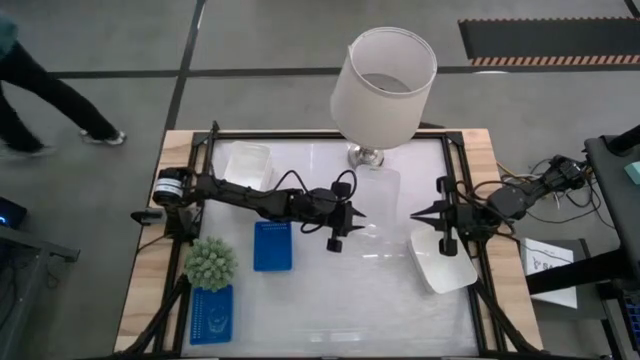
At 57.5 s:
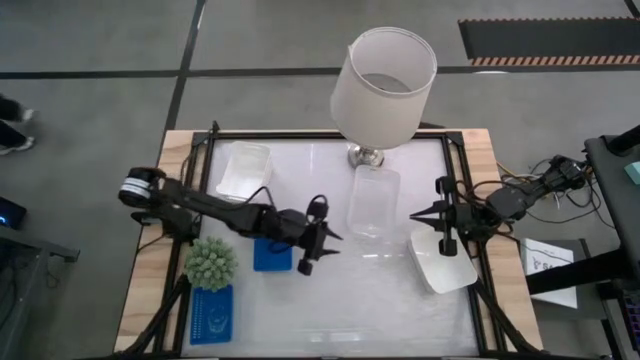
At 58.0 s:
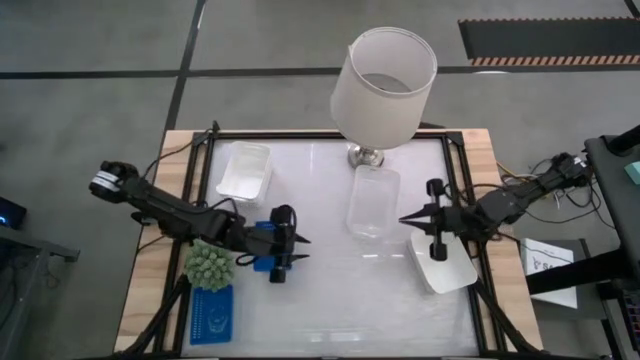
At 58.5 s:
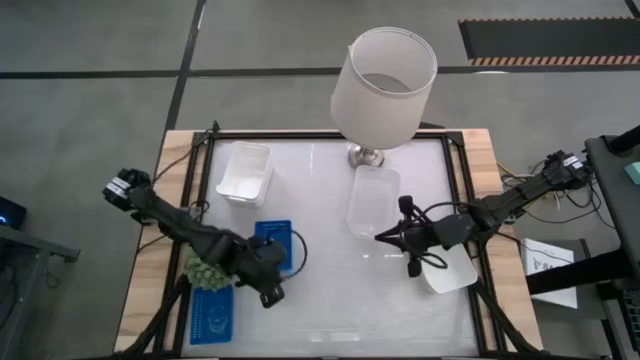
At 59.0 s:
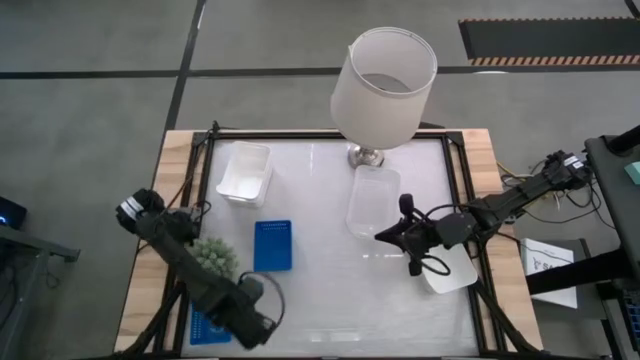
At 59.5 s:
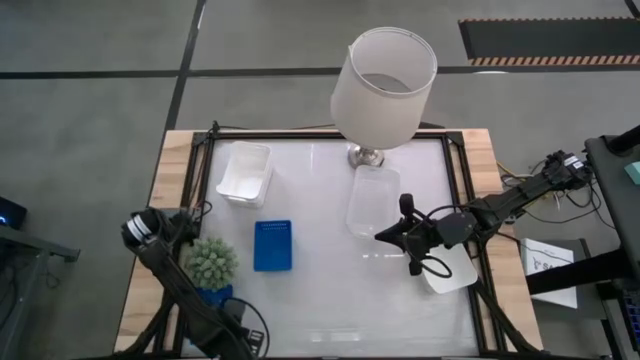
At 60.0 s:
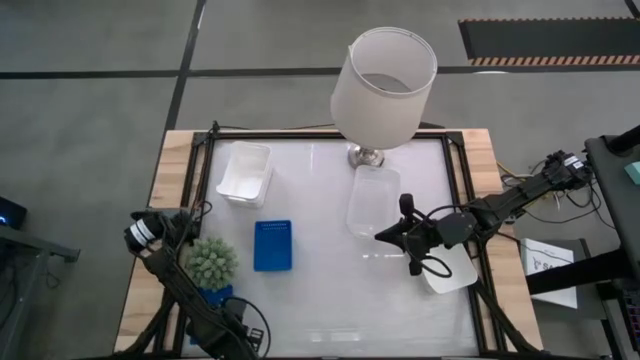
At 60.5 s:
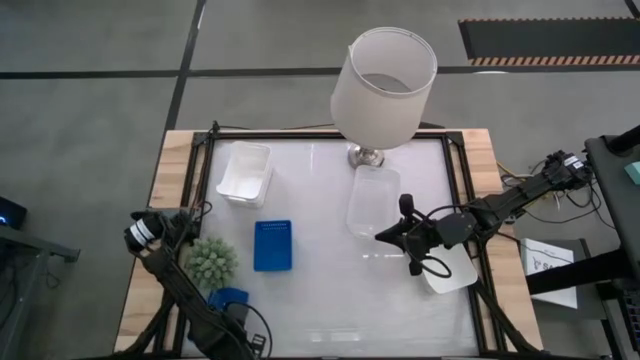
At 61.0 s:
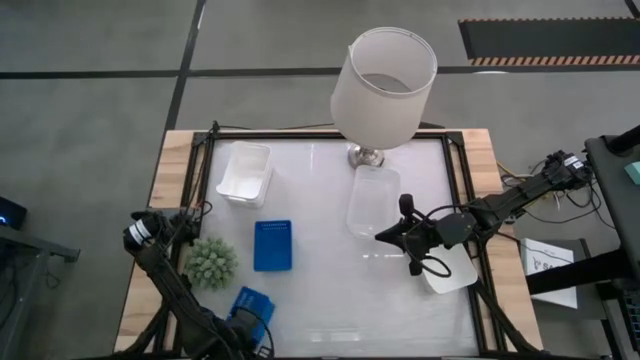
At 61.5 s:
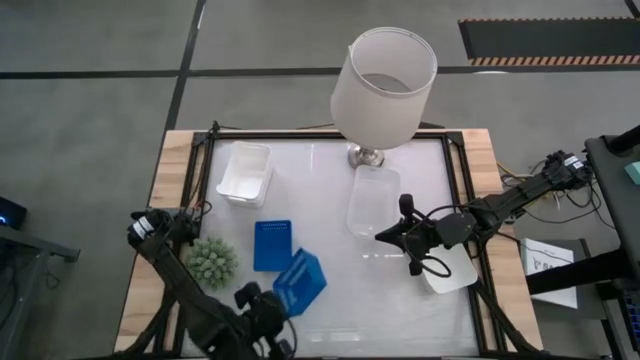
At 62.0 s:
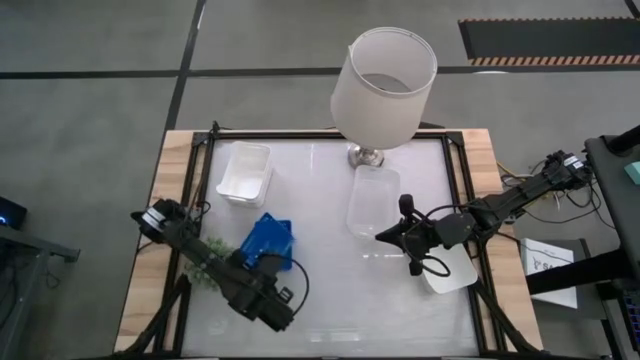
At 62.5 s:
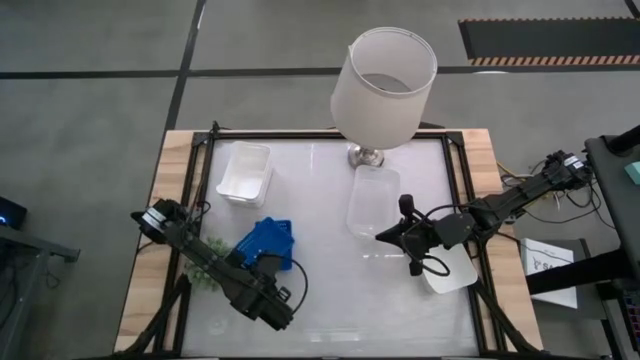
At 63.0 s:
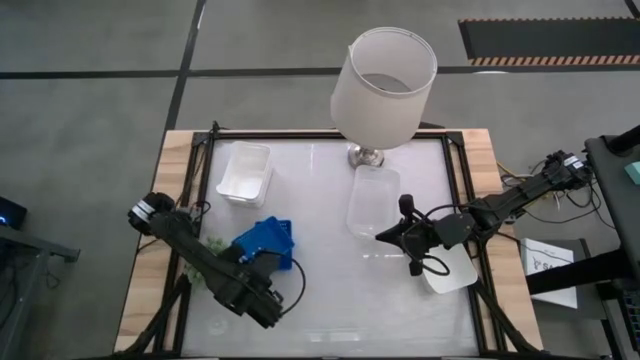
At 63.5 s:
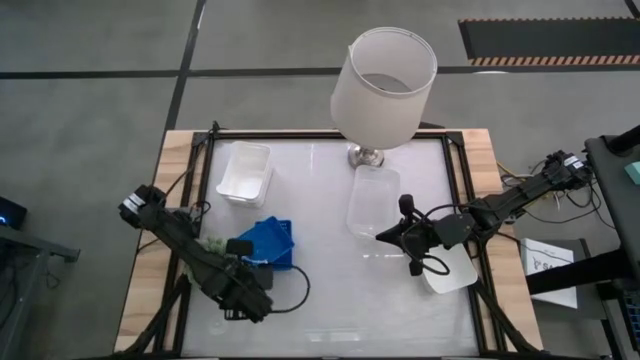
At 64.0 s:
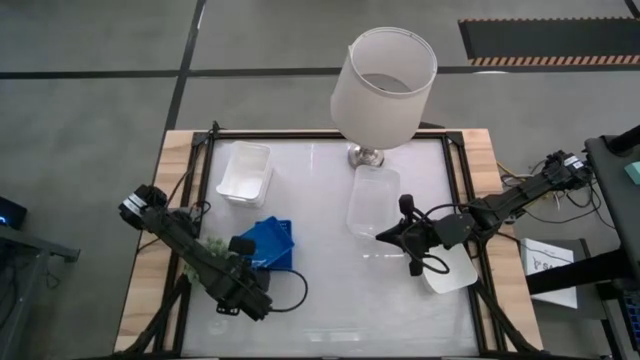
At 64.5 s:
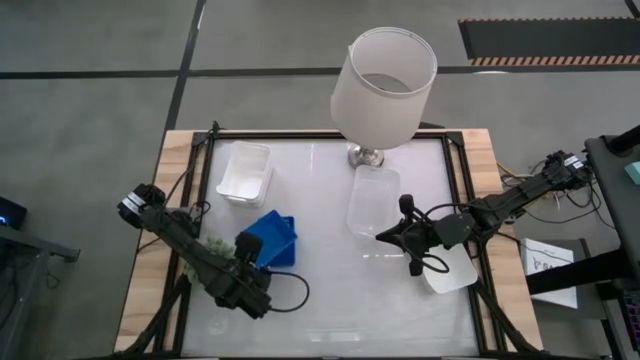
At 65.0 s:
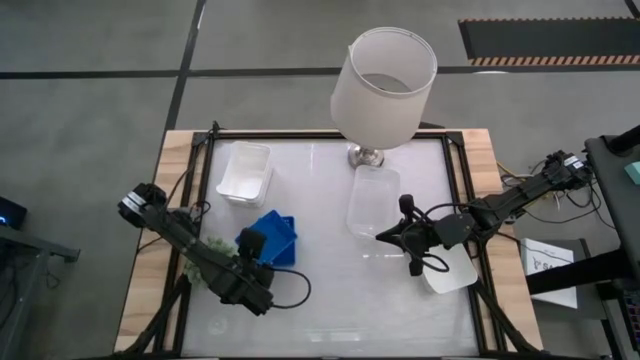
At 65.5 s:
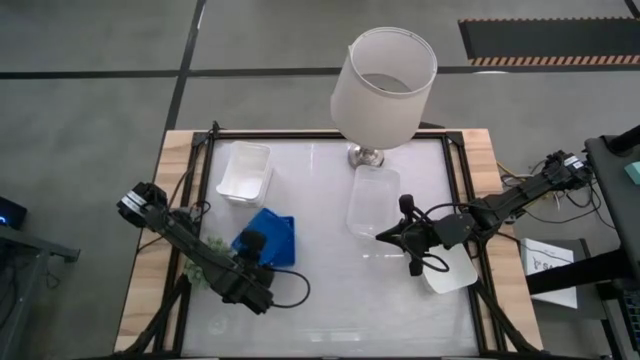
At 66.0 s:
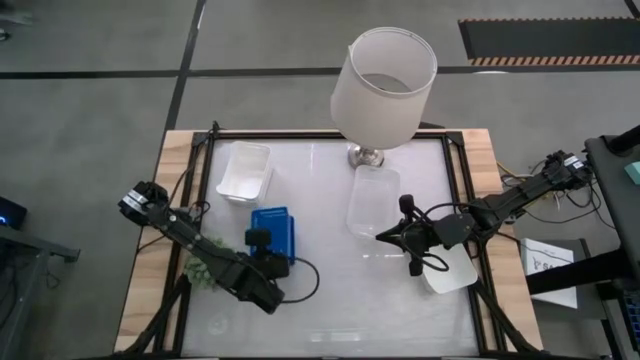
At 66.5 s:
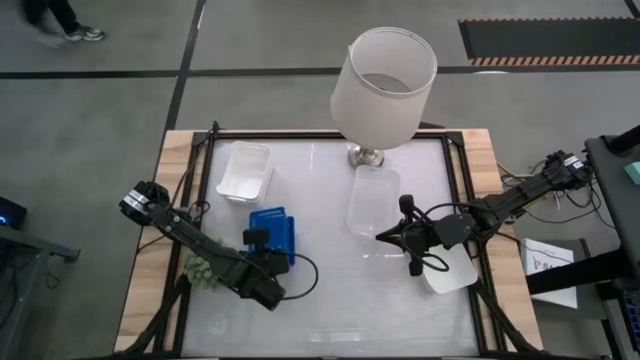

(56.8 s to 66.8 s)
Stack the left blue bin on the stacked blue bins

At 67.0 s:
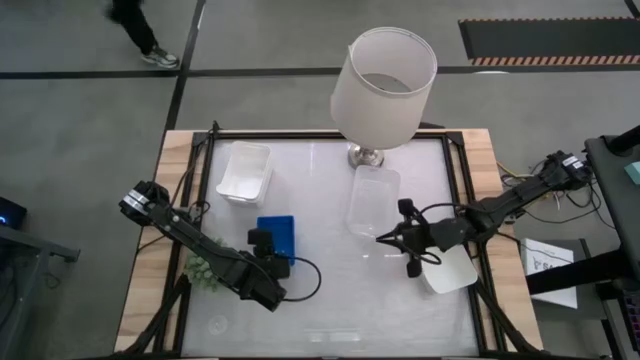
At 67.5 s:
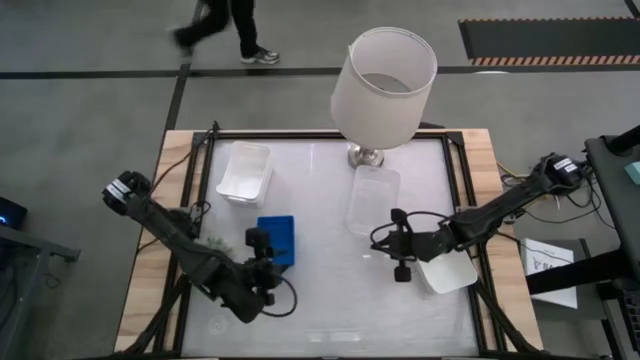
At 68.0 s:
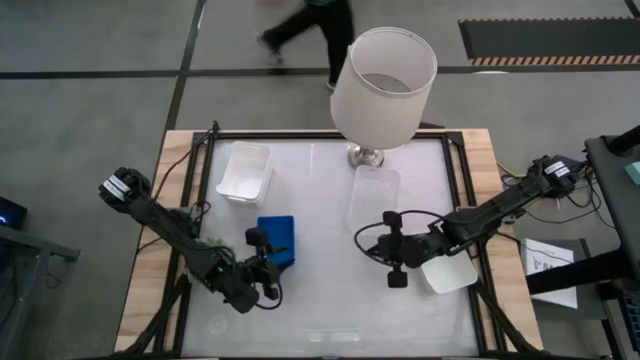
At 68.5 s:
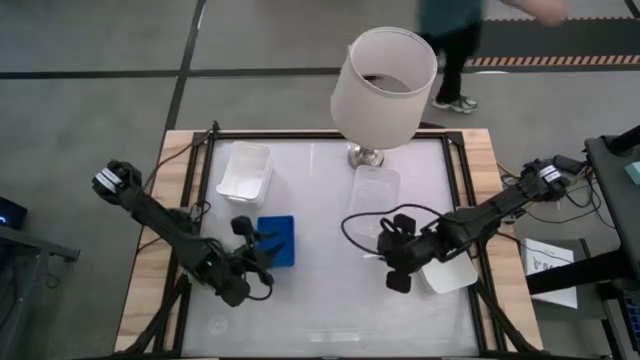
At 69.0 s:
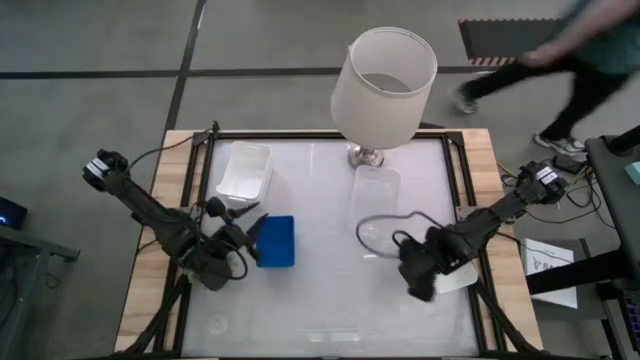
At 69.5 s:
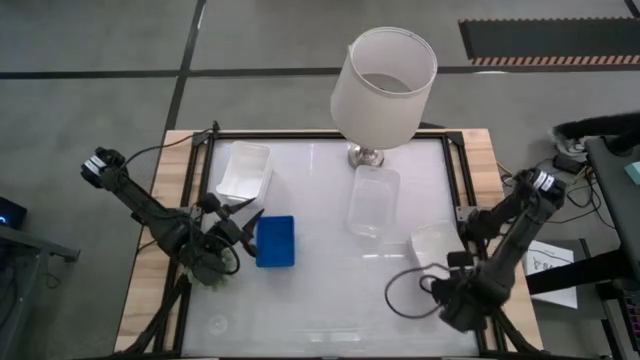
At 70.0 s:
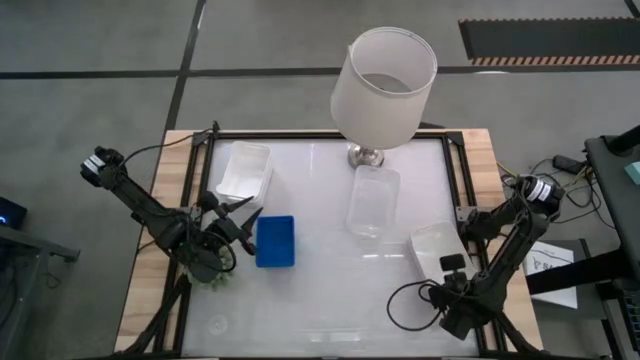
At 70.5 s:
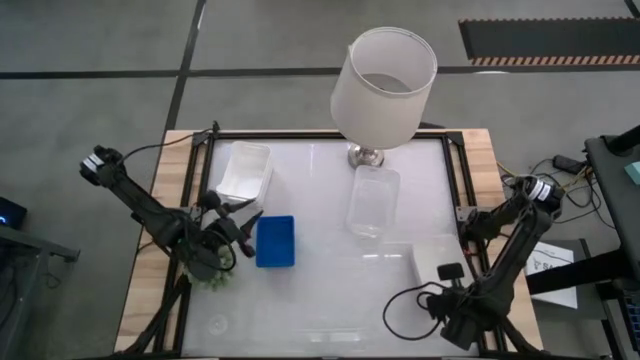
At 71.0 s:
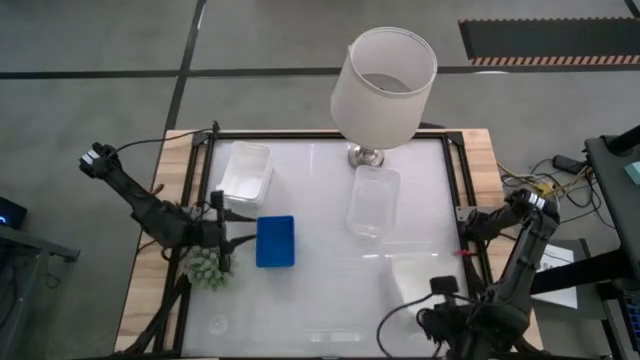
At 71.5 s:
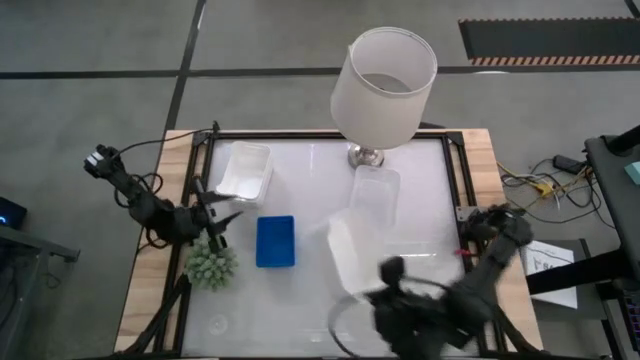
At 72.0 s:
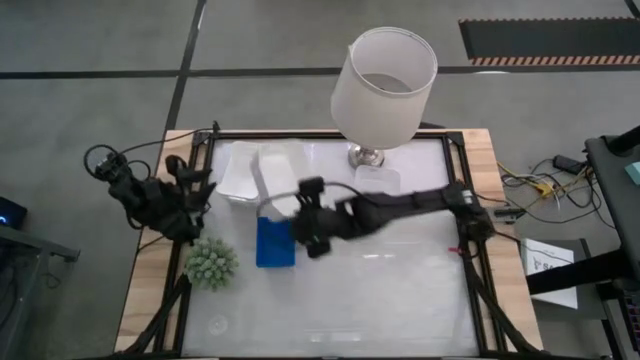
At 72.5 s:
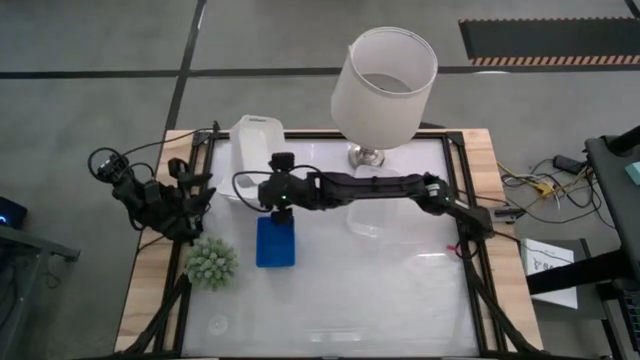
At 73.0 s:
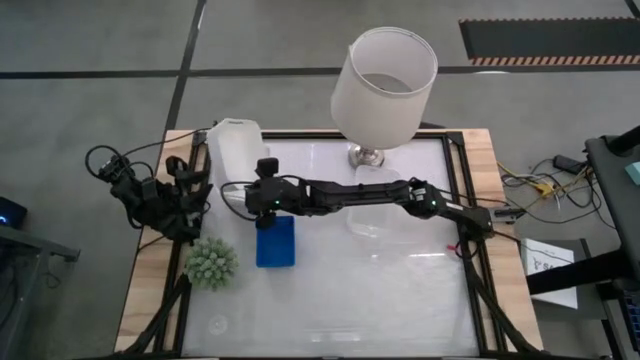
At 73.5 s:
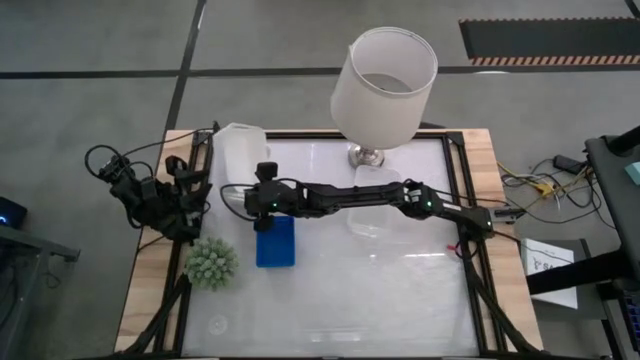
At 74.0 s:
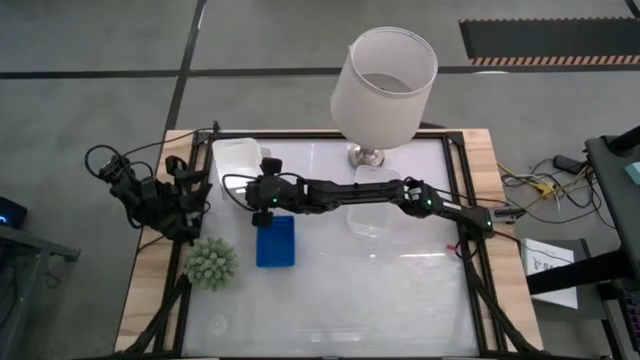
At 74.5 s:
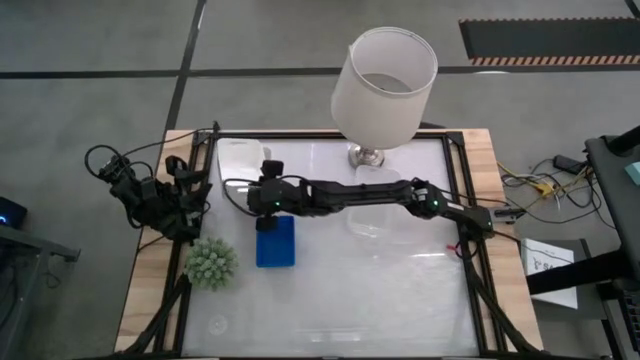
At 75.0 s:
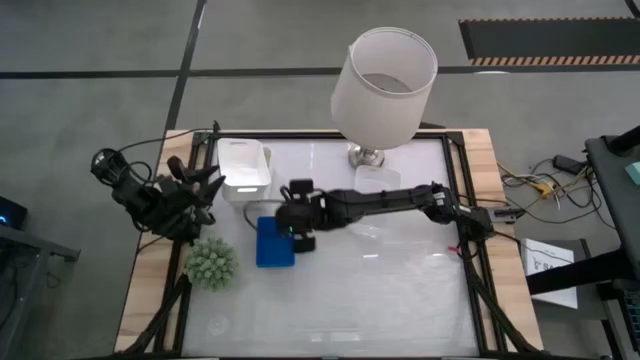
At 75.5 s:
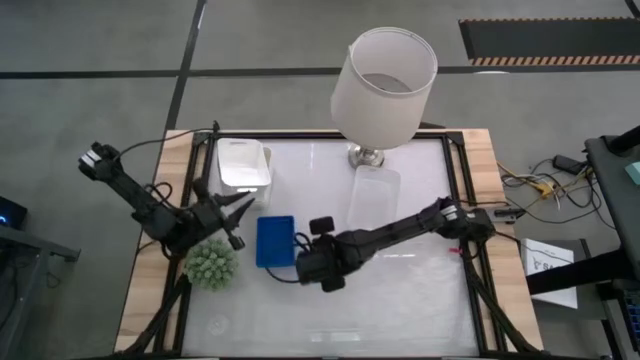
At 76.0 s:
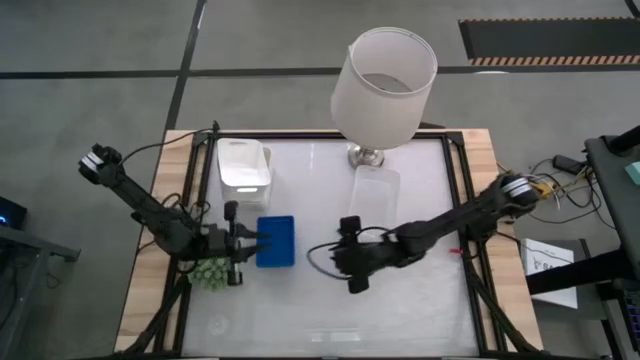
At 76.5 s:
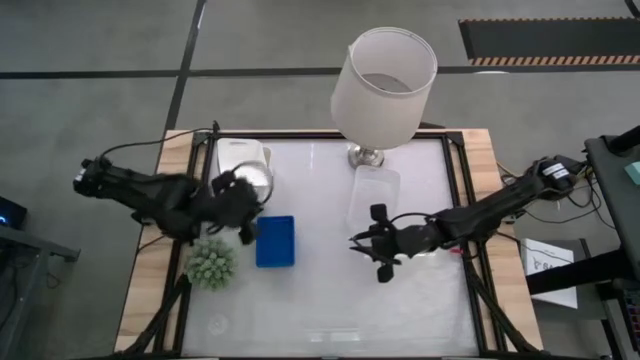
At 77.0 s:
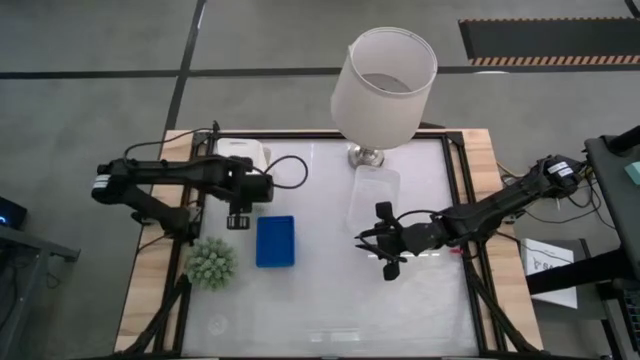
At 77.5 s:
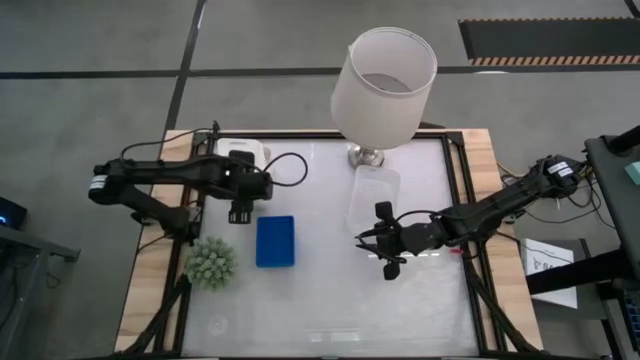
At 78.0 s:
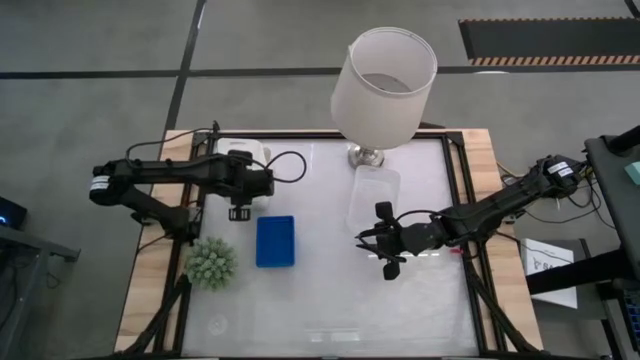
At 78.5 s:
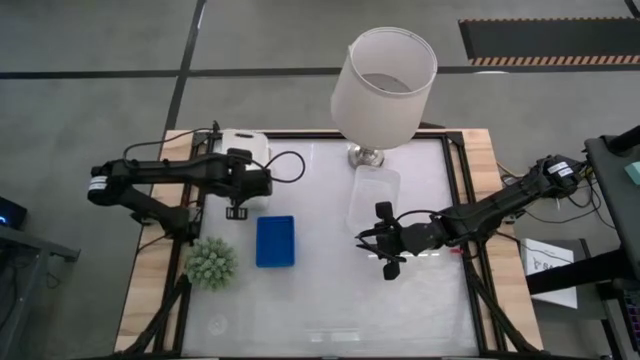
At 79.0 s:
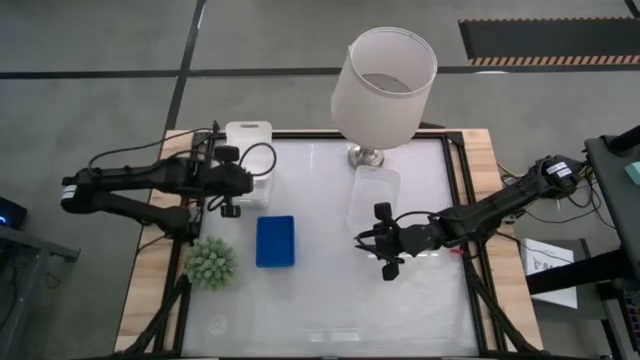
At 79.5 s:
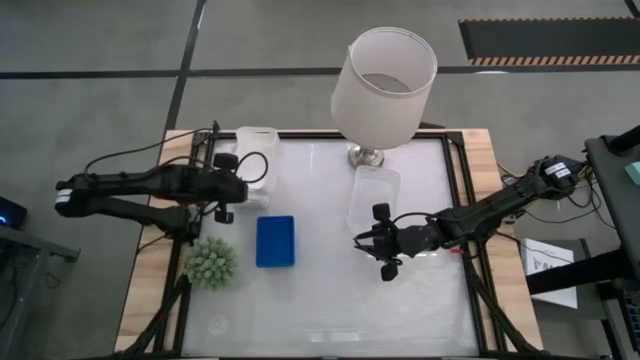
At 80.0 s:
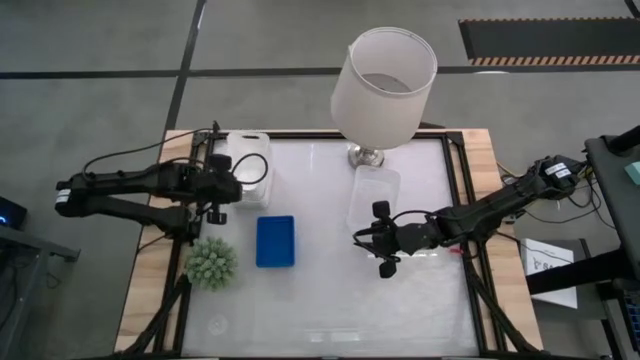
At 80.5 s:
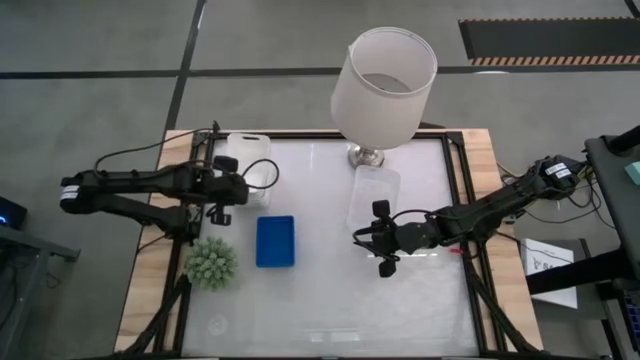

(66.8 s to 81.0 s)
Stack the right white bin on the stacked white bins
